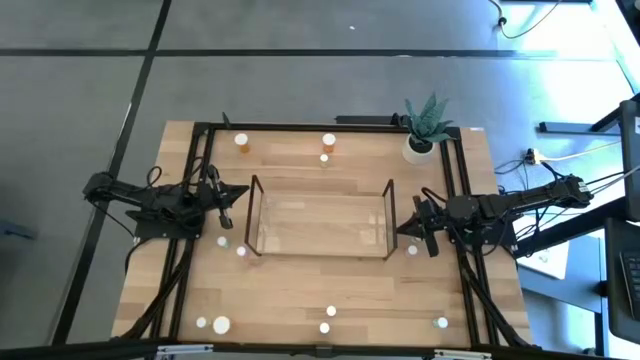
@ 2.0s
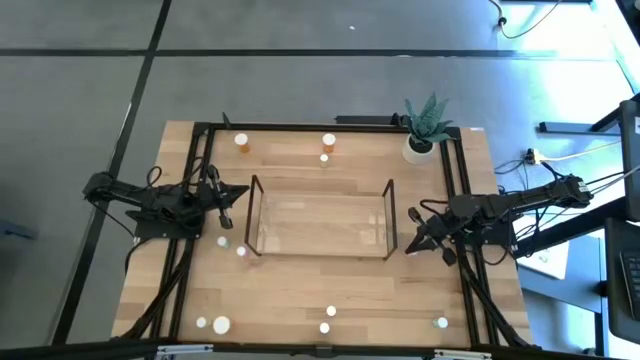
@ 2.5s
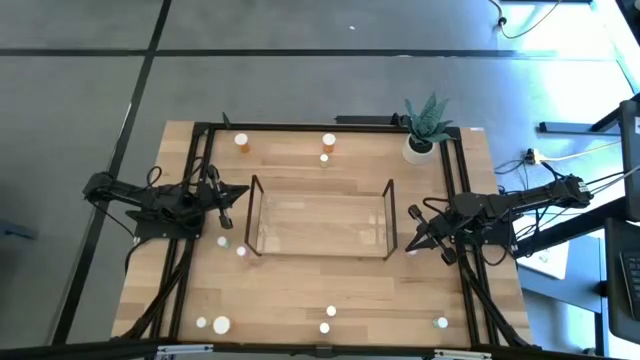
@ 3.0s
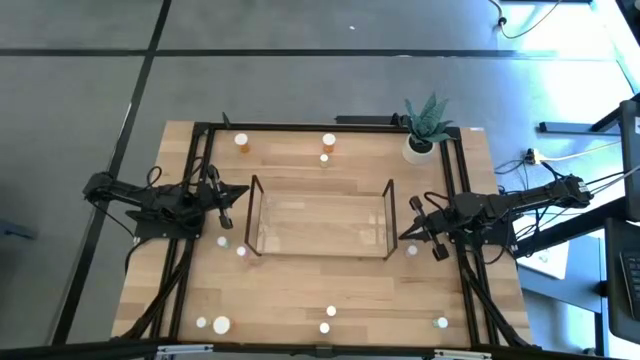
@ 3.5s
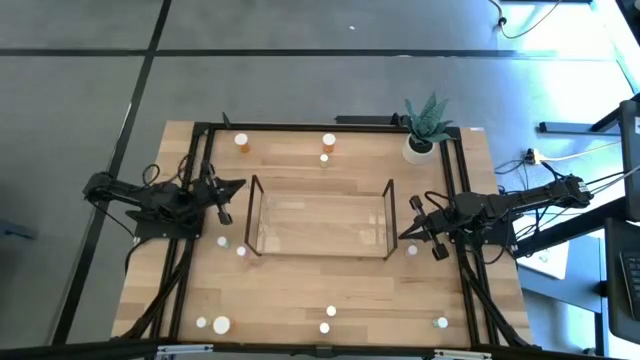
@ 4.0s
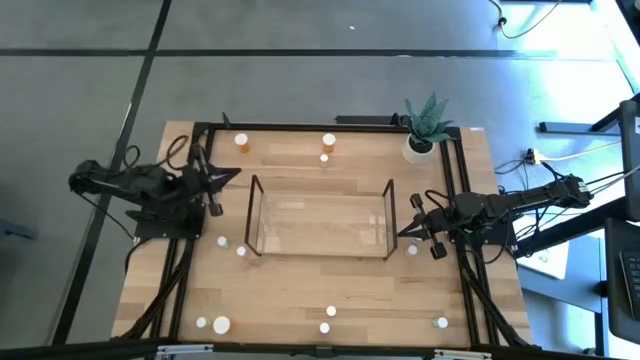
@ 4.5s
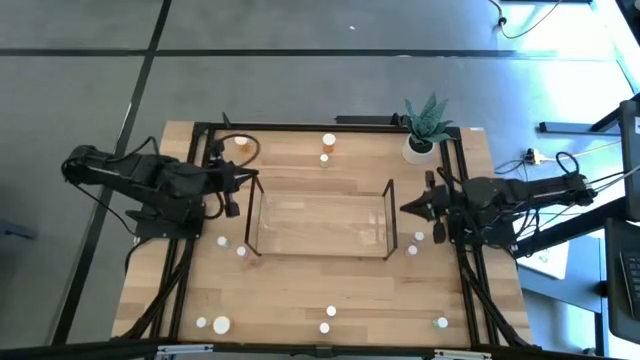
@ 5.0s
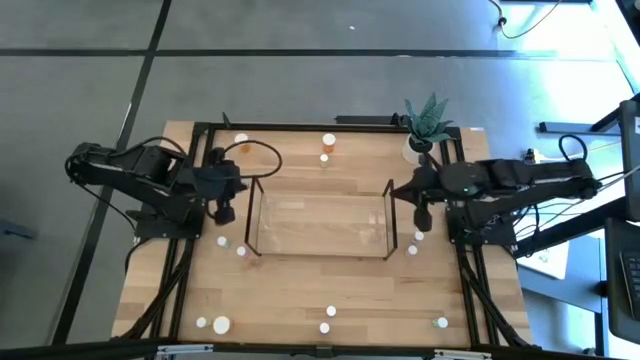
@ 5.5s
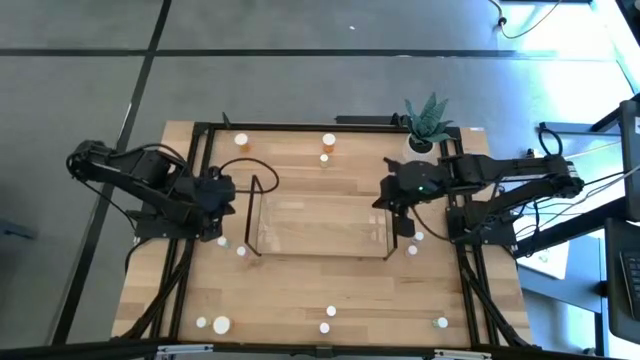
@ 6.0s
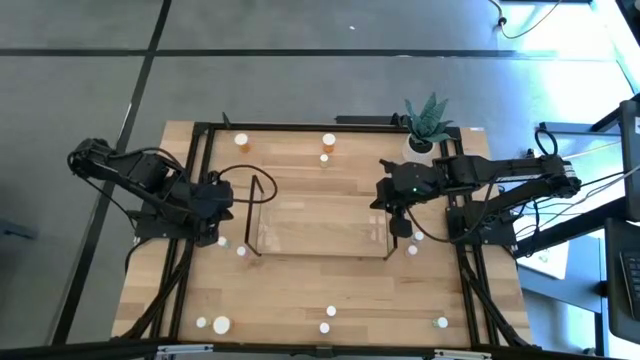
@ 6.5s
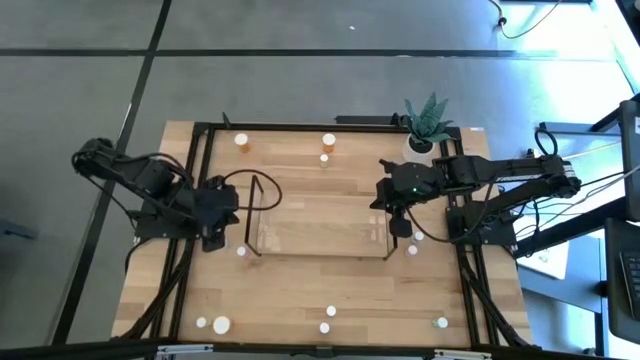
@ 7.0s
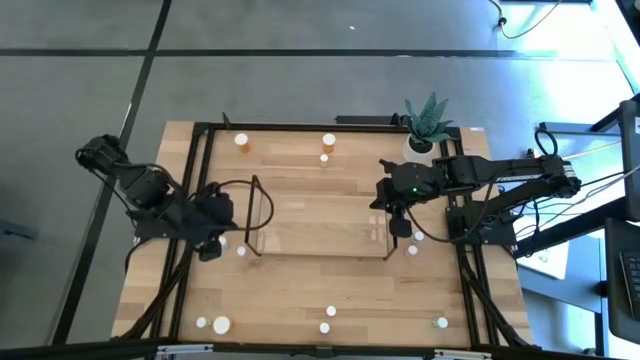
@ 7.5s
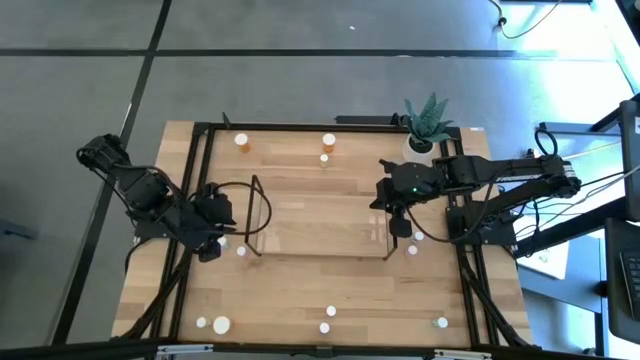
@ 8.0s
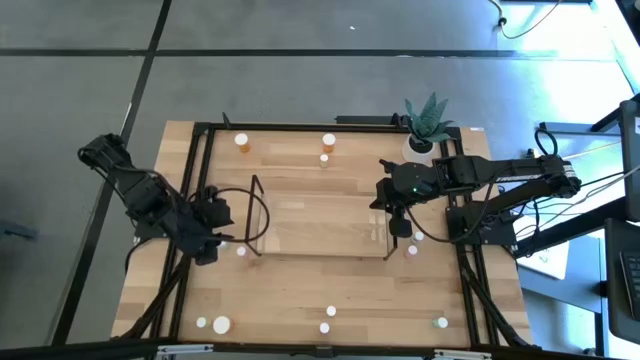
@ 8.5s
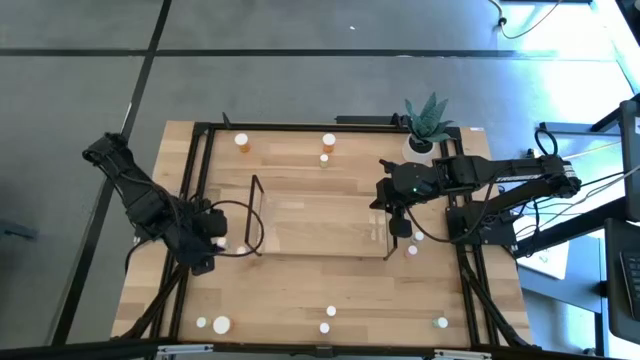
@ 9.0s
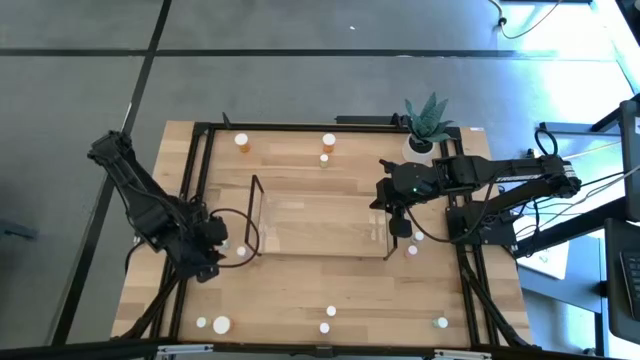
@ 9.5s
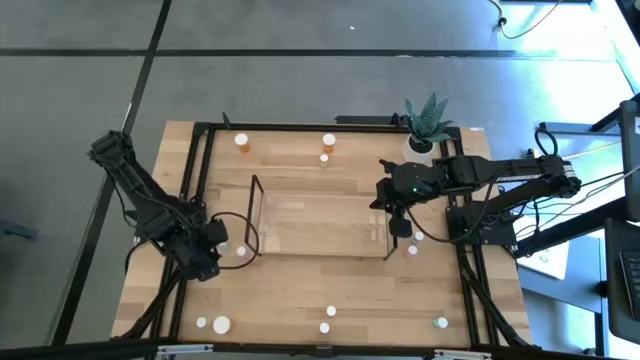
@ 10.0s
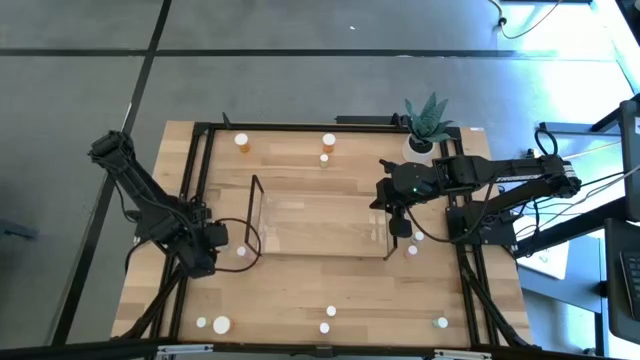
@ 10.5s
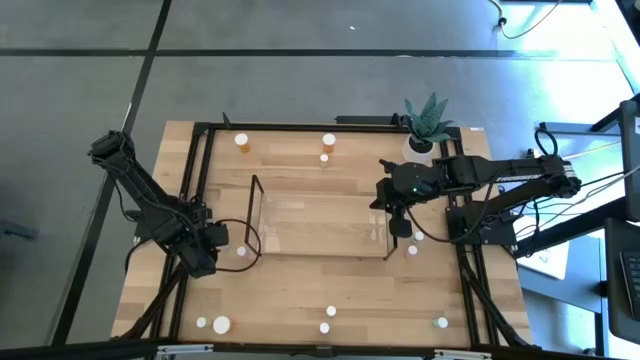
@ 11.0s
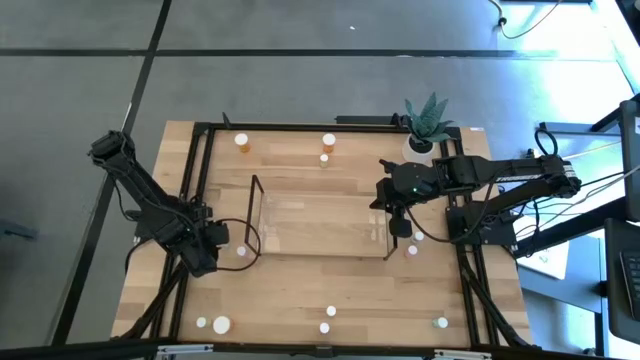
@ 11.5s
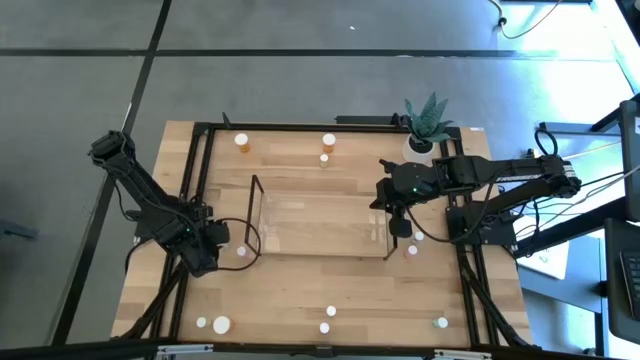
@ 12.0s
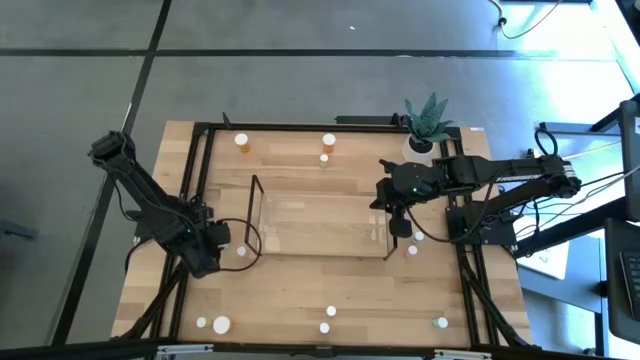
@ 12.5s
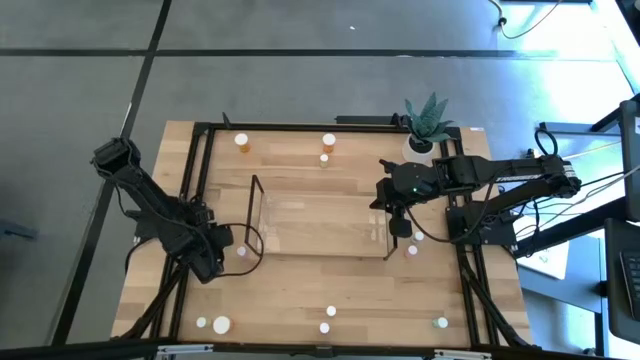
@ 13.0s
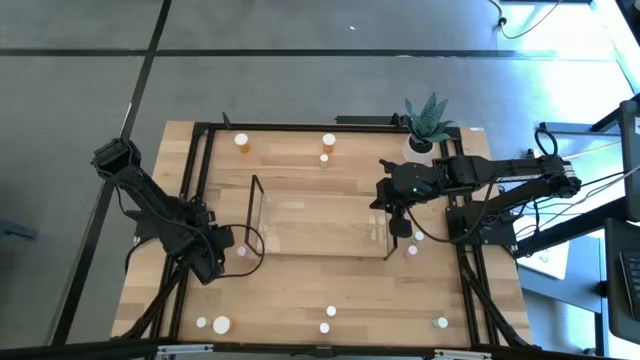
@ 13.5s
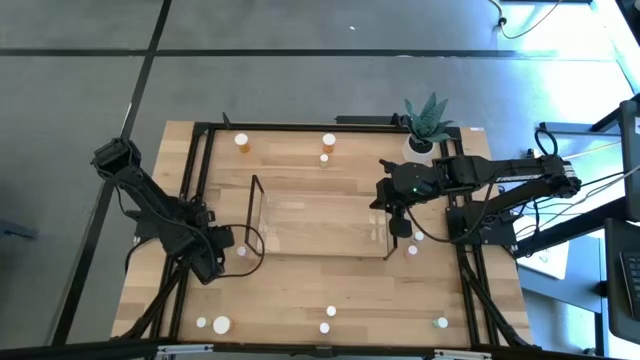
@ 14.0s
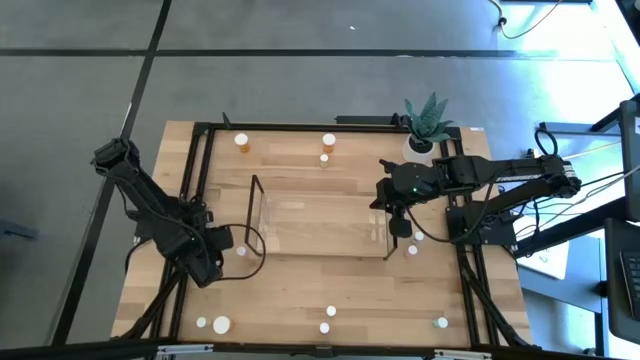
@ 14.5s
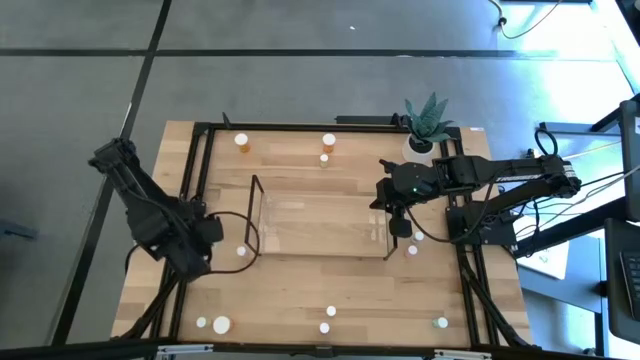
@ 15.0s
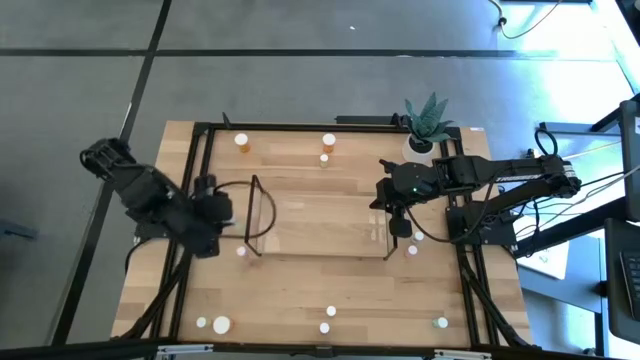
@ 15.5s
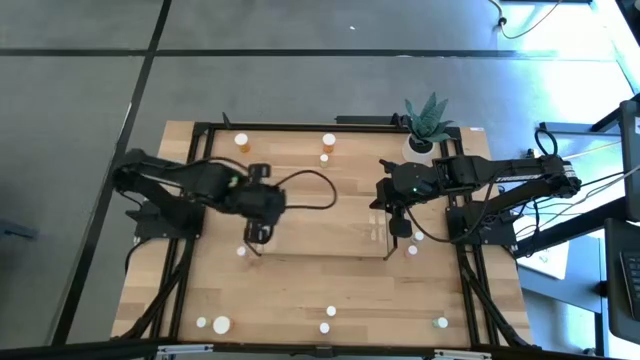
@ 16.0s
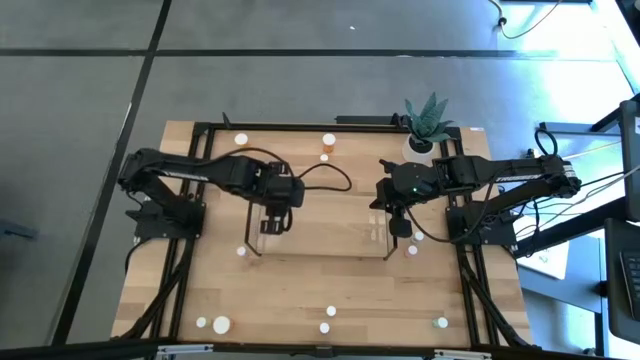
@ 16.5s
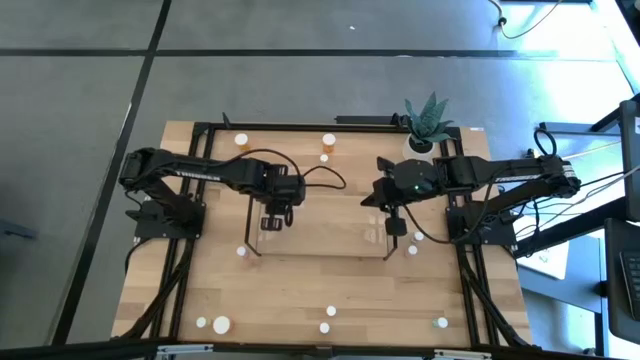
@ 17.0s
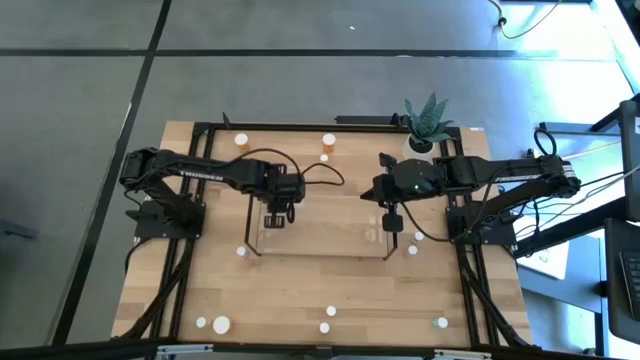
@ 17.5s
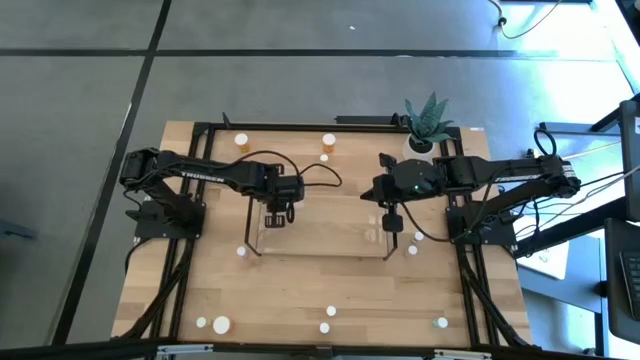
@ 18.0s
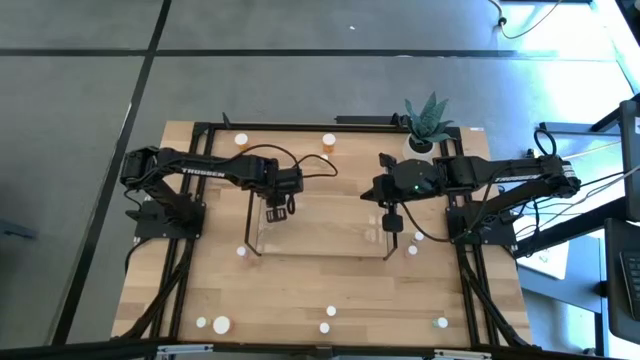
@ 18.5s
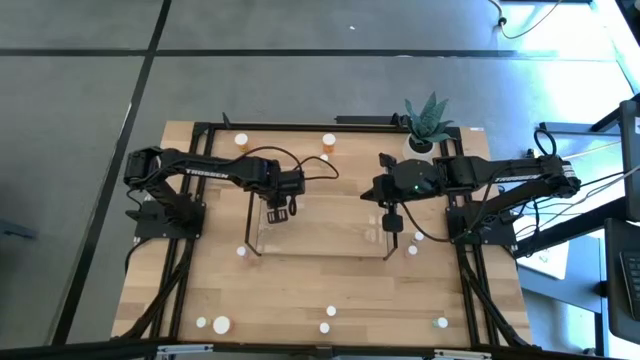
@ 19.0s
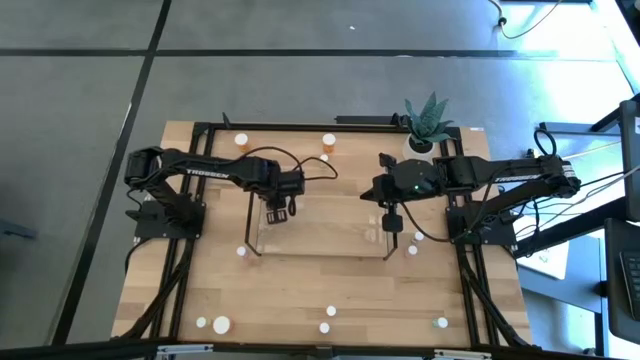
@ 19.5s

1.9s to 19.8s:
Task: Pick and place medicine bottles onto shelf by color
Put the top left blue pill bottle on the shelf

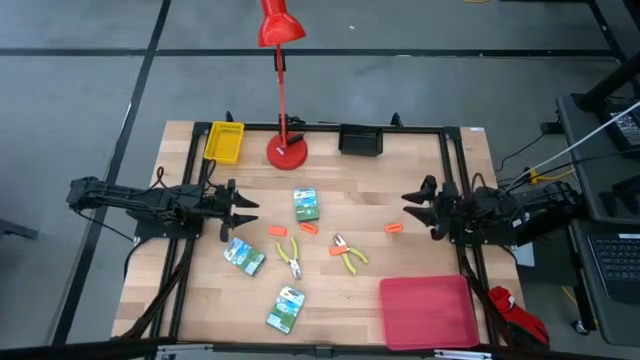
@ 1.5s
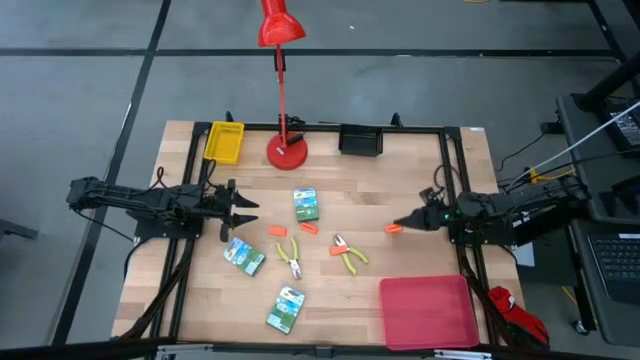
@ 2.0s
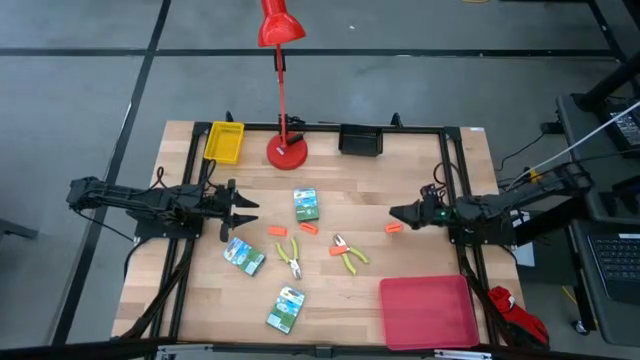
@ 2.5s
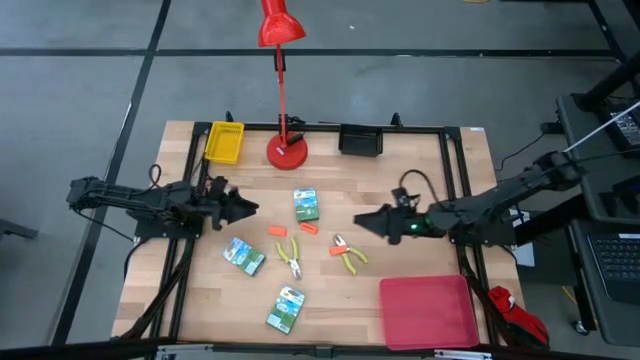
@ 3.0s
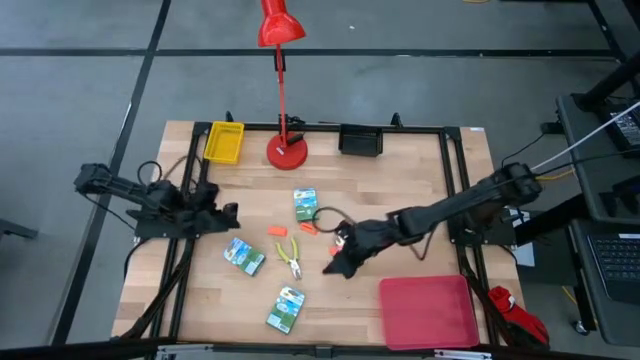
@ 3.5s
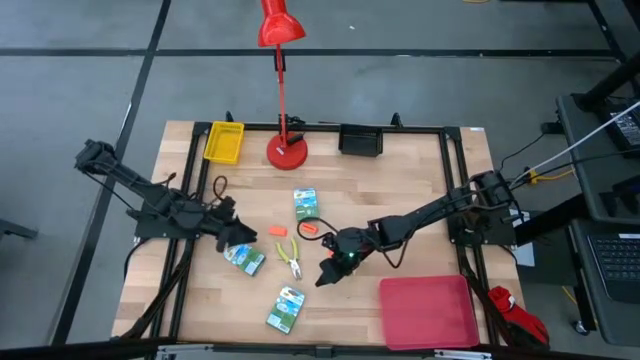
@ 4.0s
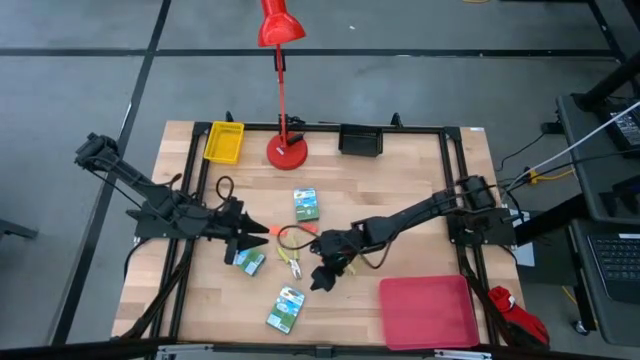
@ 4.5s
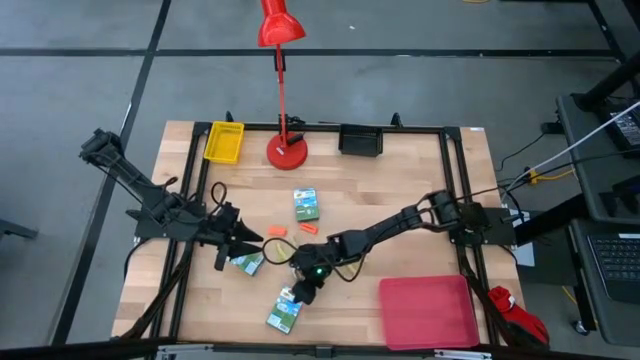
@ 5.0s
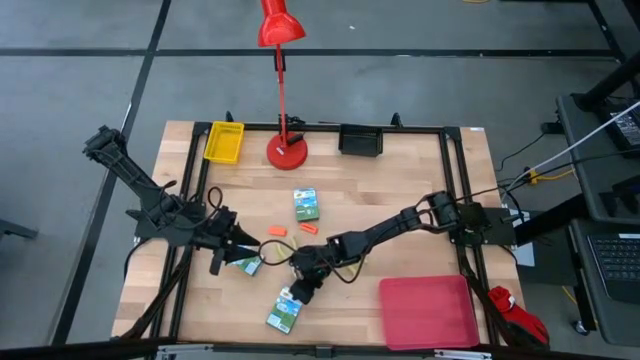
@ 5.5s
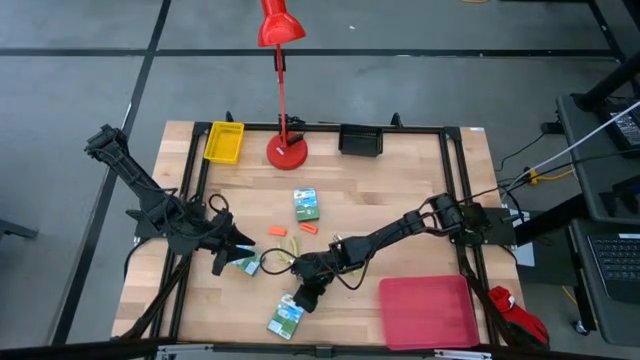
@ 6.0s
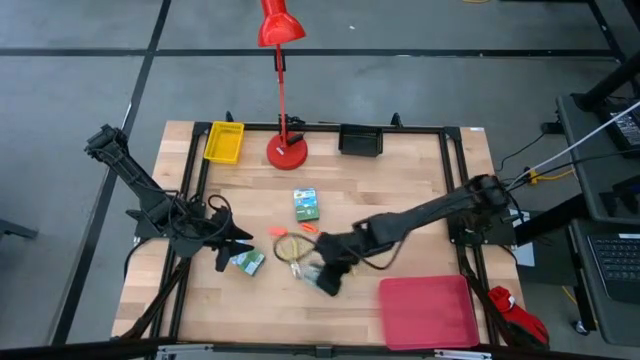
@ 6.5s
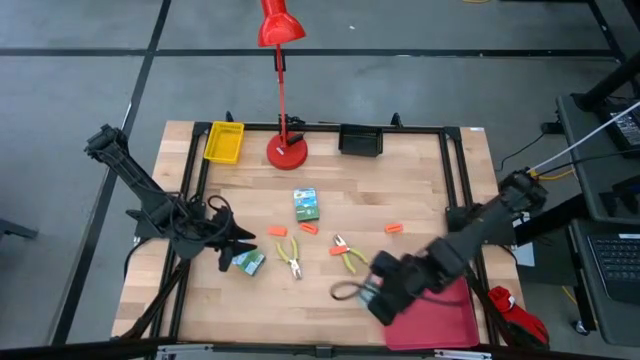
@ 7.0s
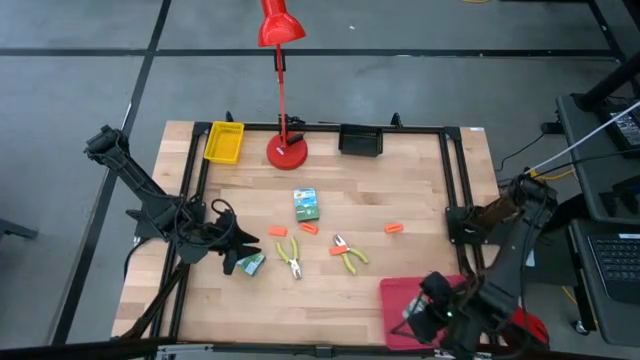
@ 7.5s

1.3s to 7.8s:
Task: Pick & Place School Supplies
Put the yellow crayon box into the red bin
